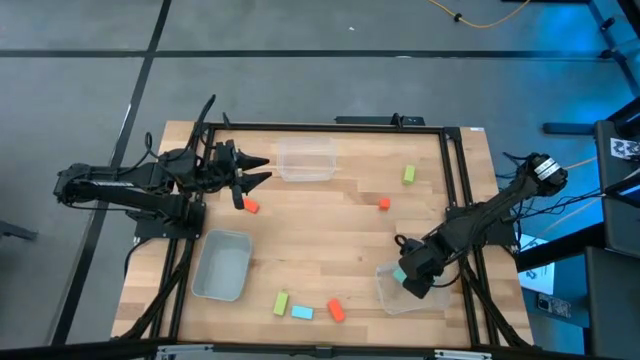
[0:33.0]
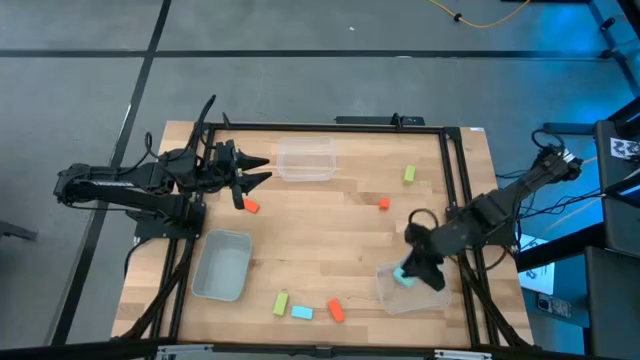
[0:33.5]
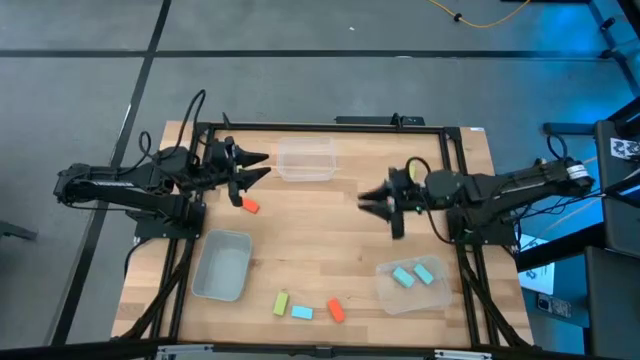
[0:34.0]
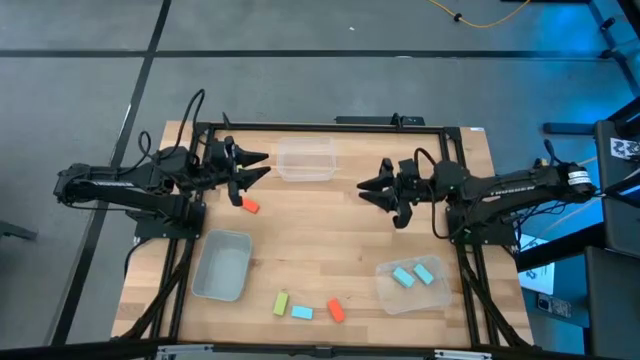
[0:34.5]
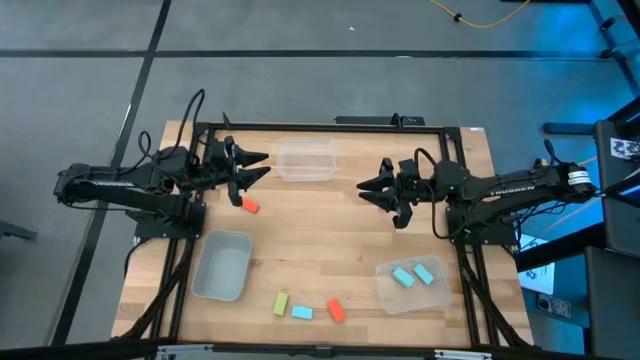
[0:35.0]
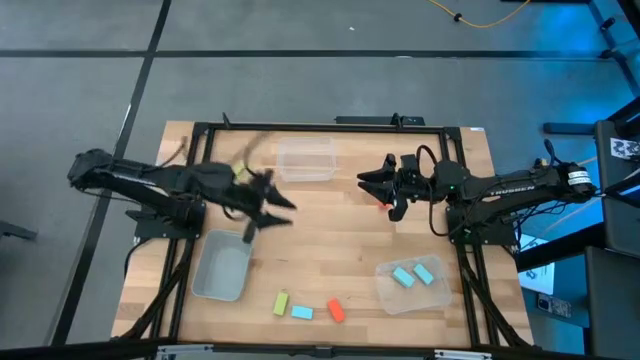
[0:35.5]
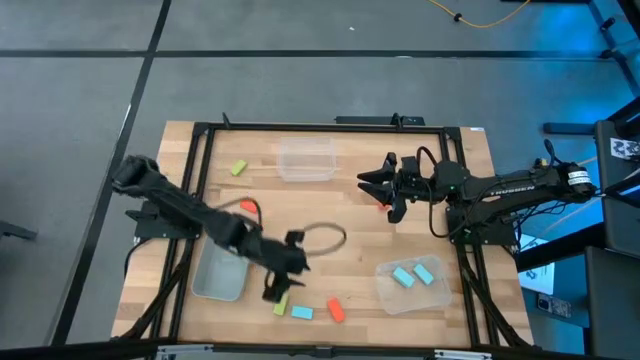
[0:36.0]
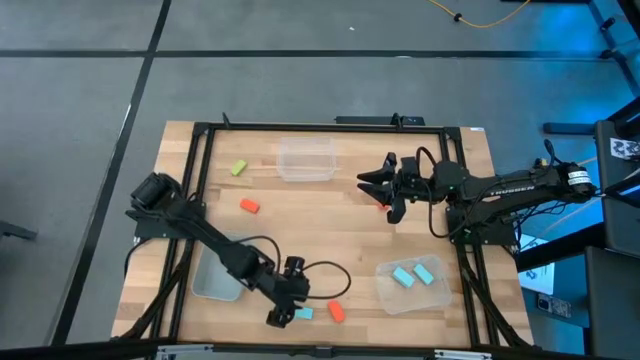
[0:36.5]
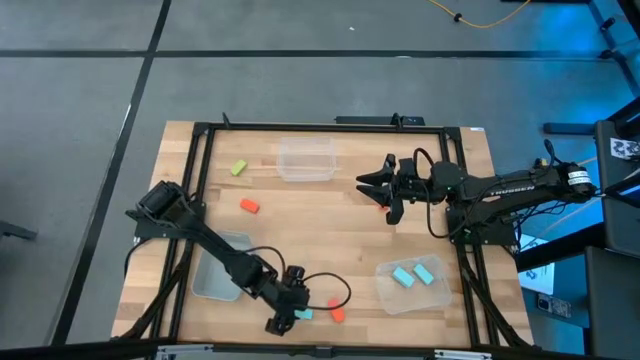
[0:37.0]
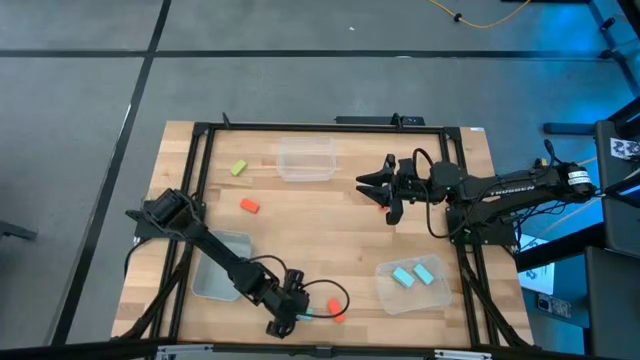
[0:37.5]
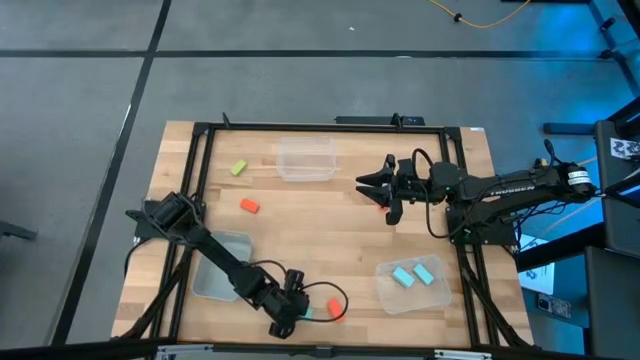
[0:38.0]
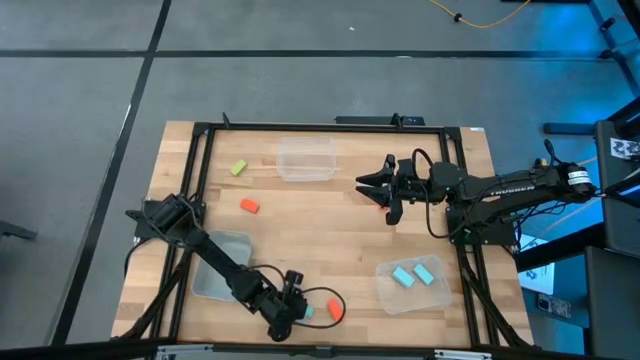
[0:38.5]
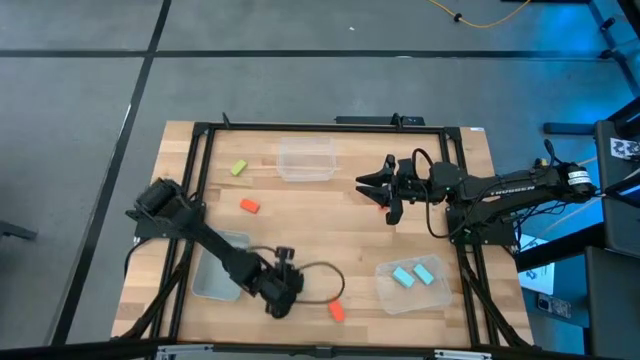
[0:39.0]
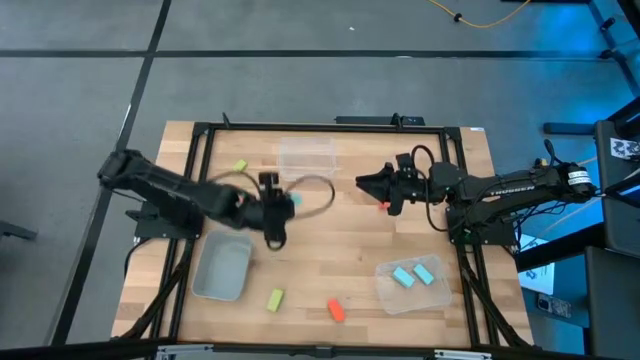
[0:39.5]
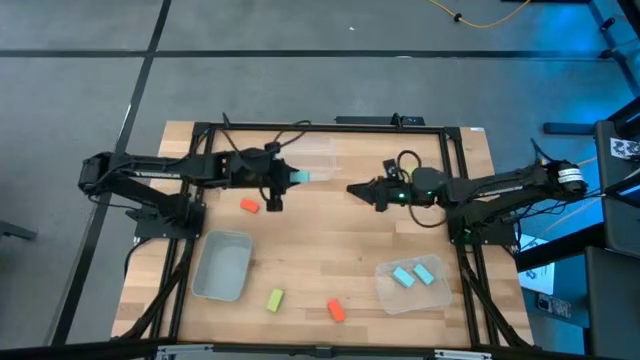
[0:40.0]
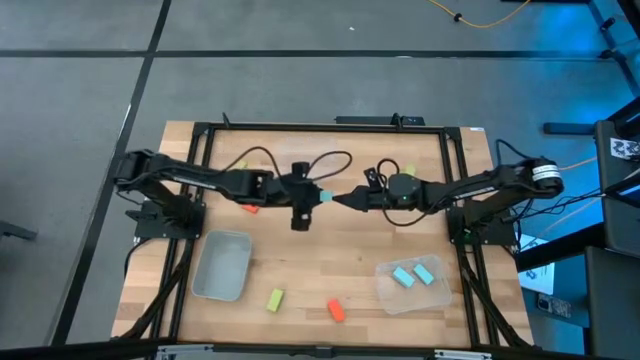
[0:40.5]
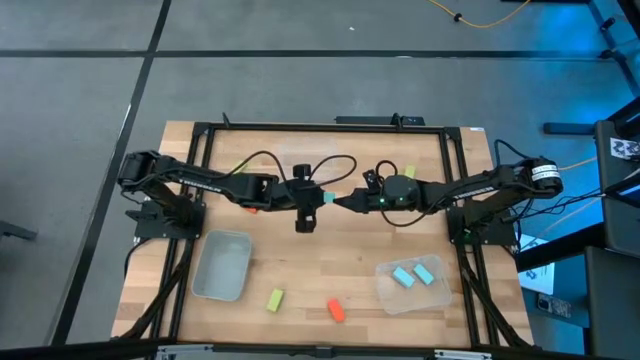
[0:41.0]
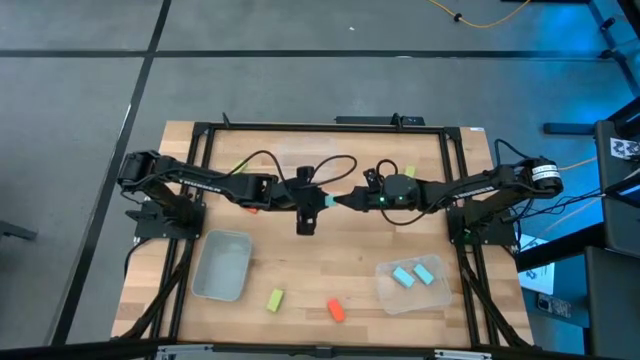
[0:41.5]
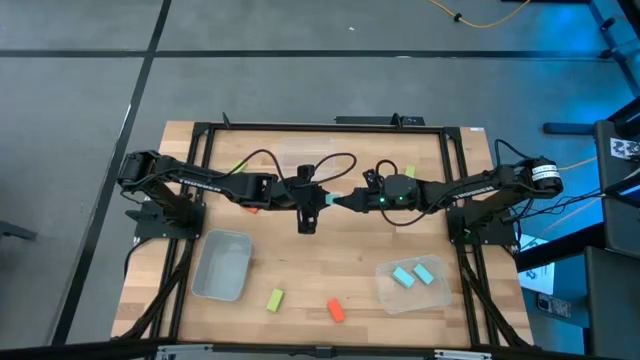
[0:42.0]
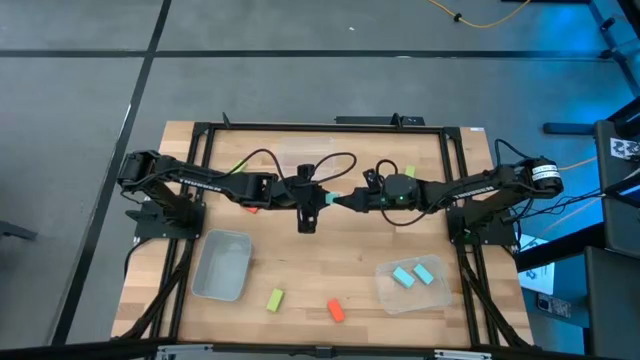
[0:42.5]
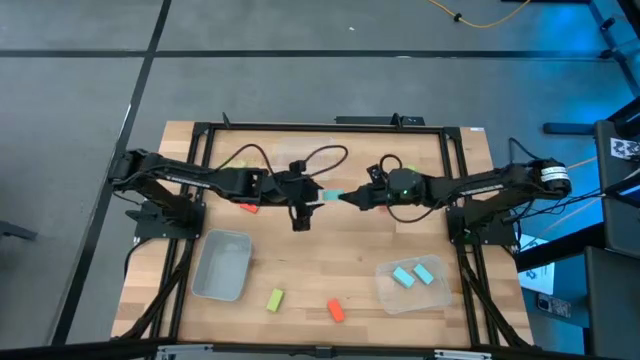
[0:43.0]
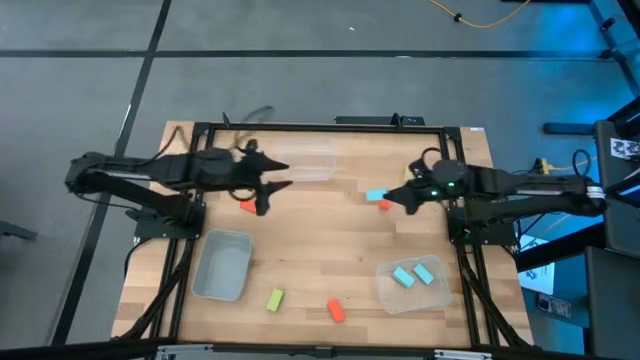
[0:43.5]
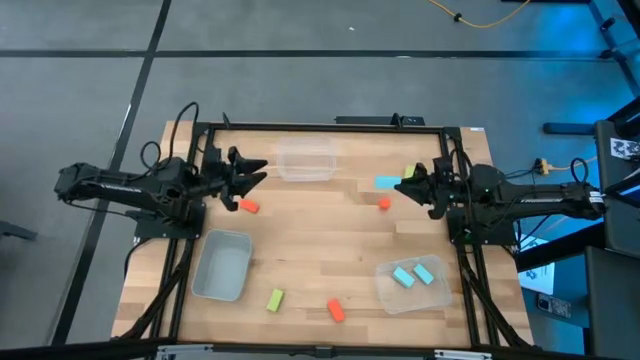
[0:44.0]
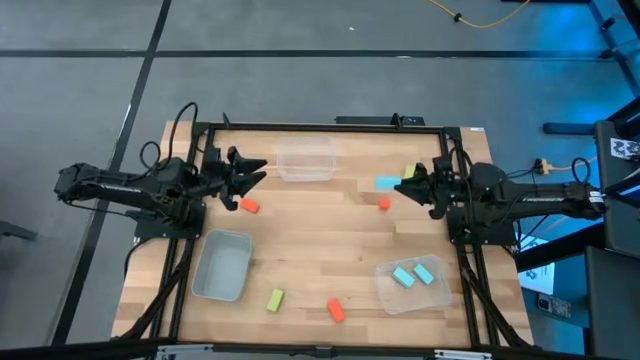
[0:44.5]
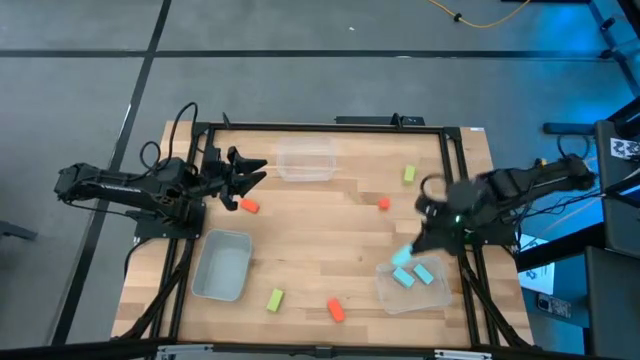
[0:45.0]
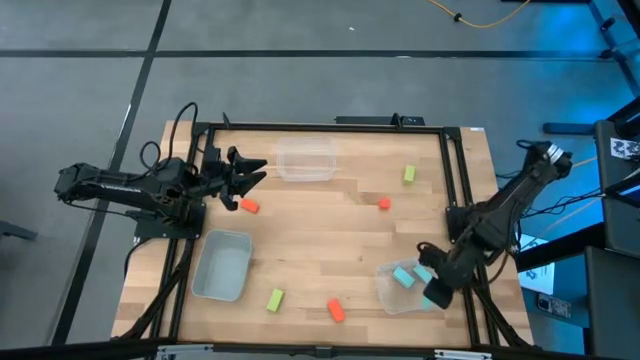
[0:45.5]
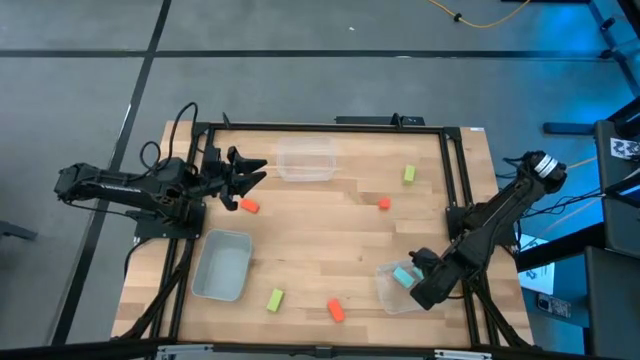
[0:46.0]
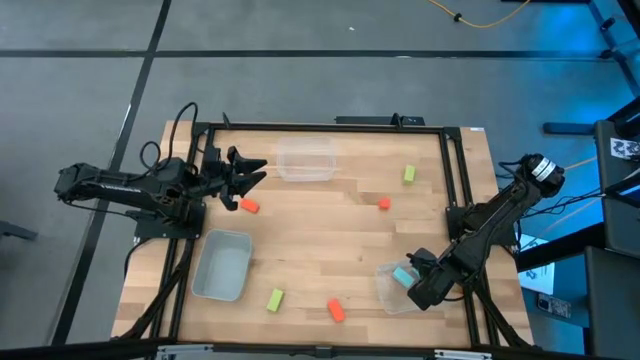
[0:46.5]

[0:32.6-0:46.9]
Task: Sort & place blocks by color
Put the light blue half pillar block into the bottom transparent bin

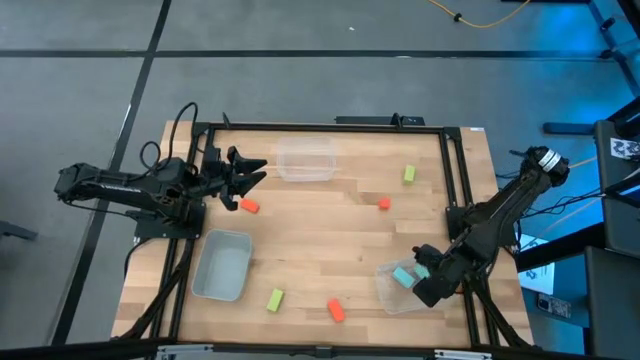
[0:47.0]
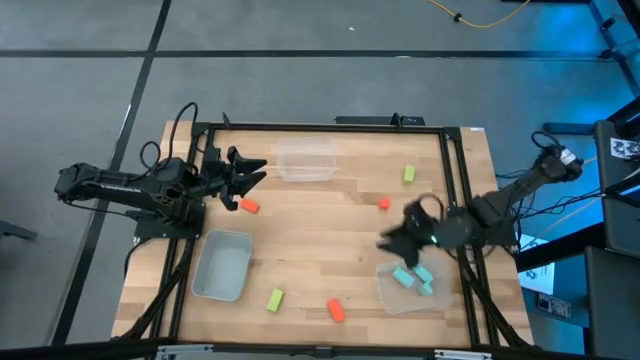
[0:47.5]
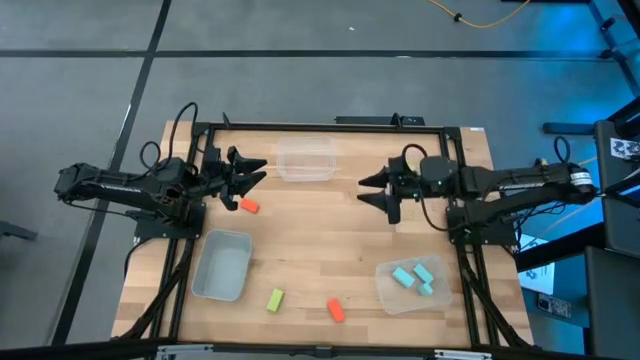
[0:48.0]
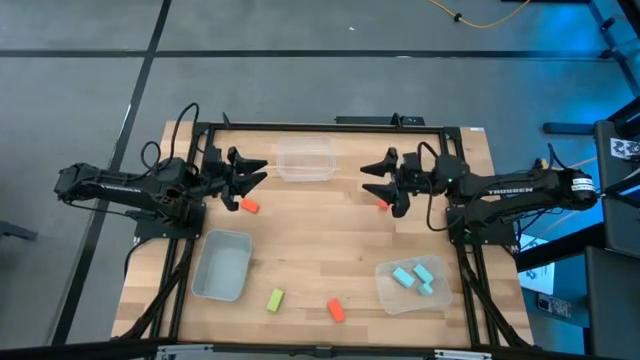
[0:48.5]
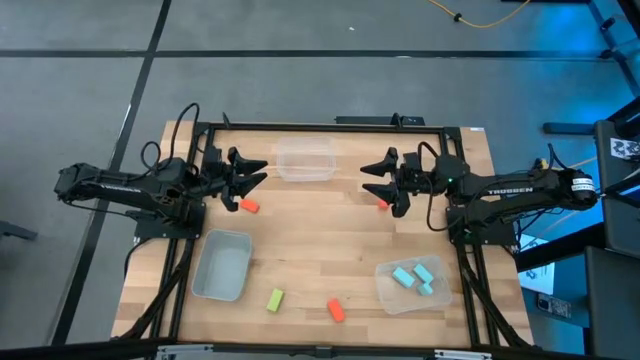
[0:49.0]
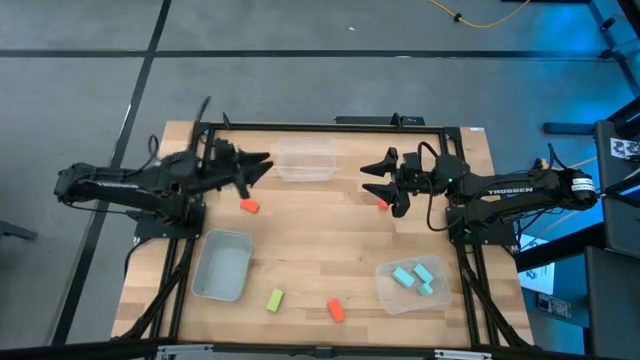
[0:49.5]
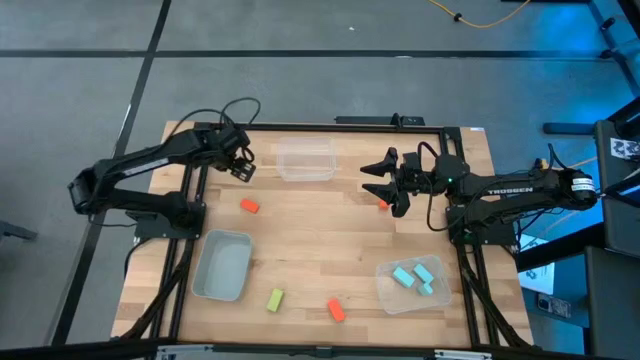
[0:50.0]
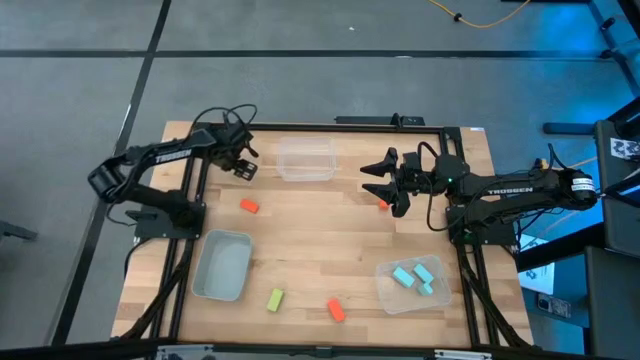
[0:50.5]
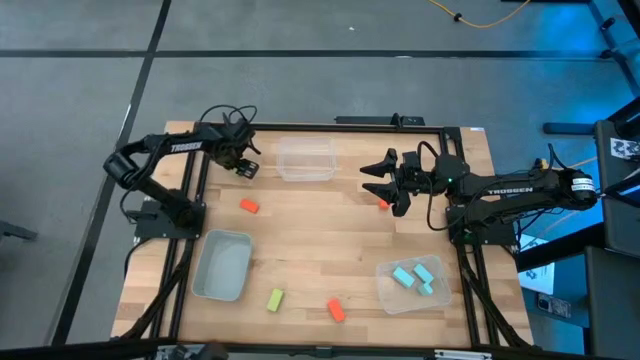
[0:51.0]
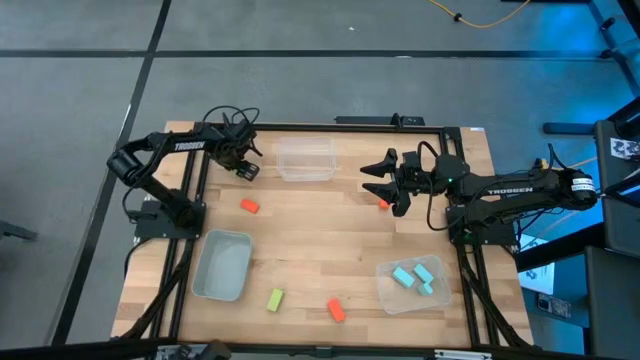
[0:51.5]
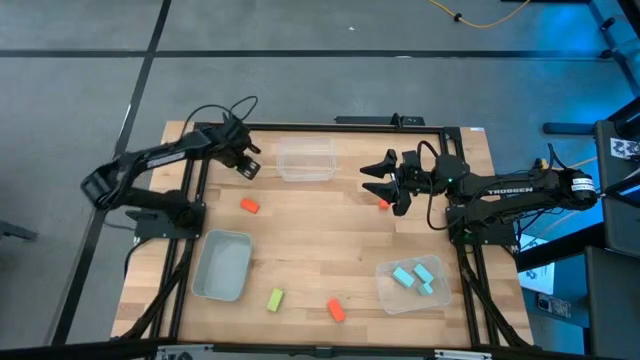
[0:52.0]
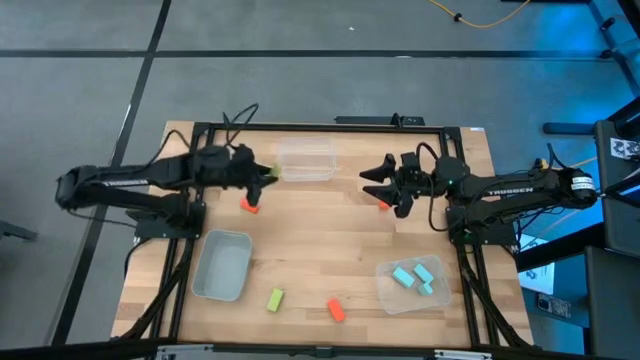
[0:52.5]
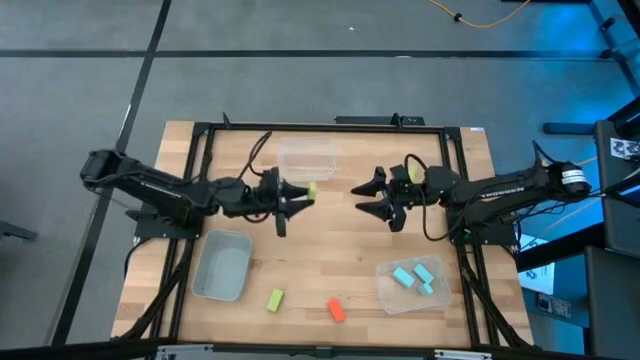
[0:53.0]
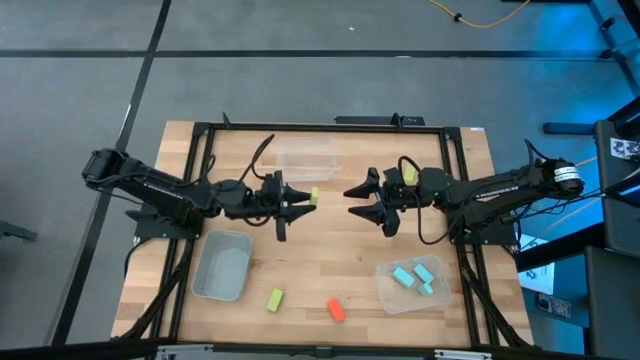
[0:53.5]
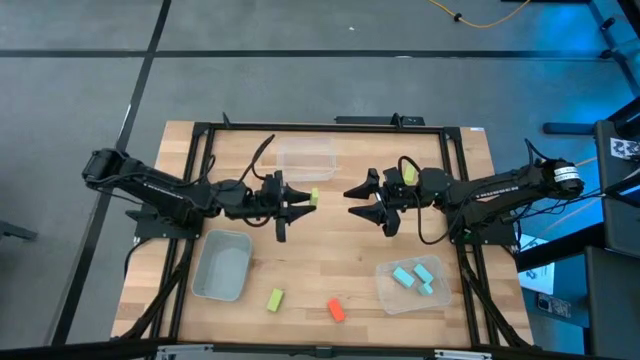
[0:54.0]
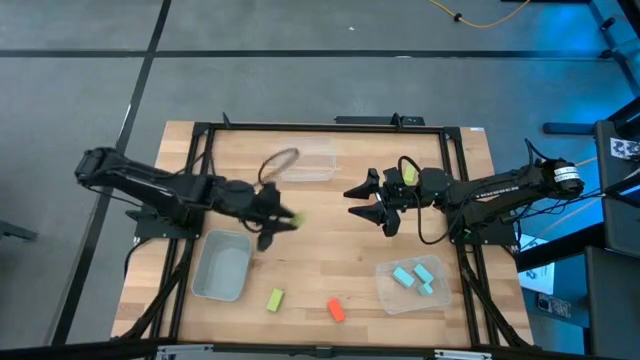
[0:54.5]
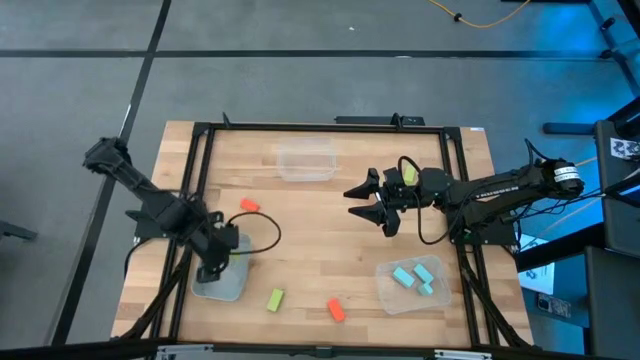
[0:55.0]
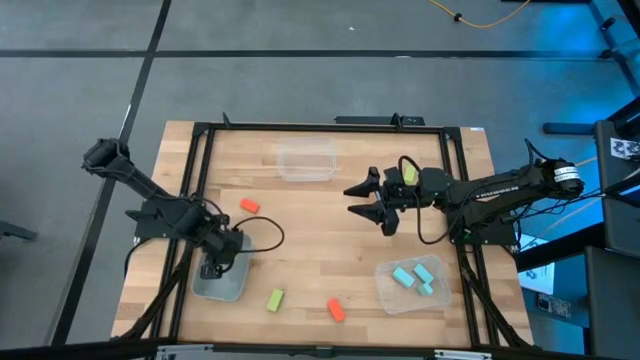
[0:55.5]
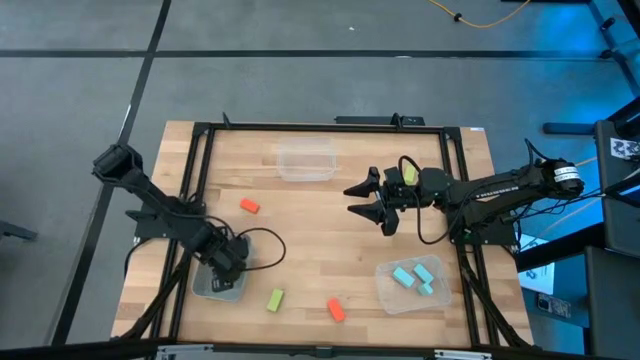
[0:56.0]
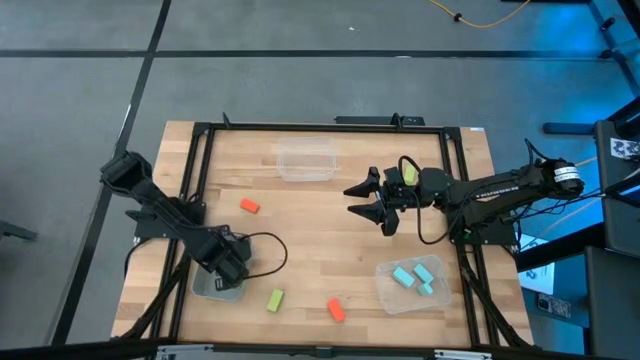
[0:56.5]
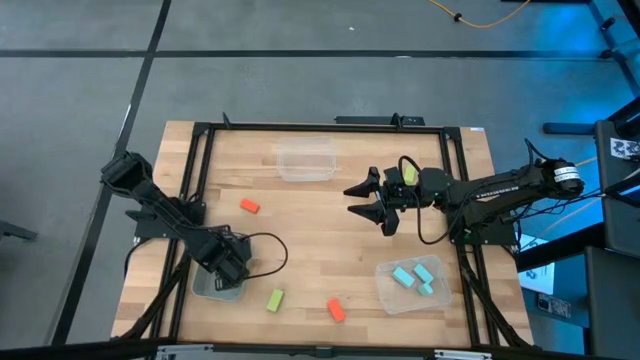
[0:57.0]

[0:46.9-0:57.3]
Put the top left lime green half pillar block into the gray bin
